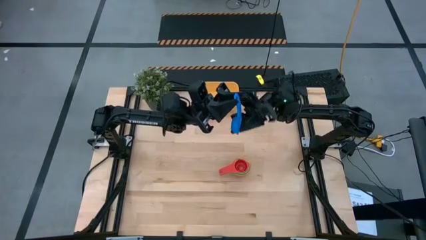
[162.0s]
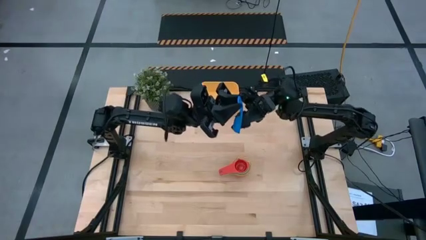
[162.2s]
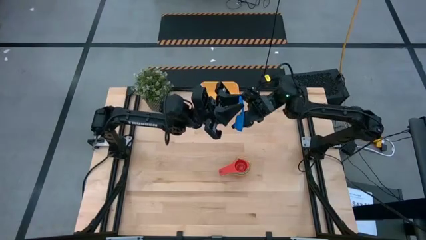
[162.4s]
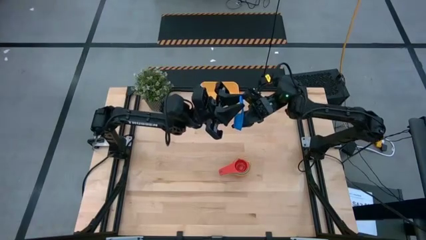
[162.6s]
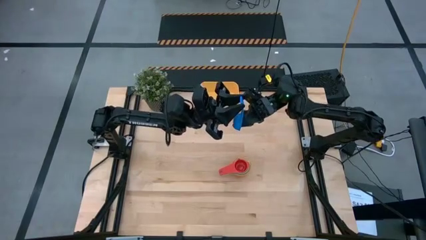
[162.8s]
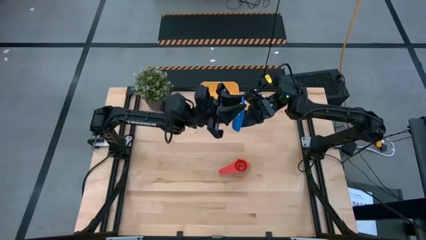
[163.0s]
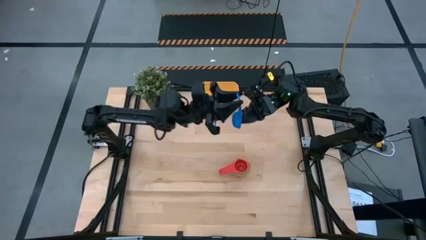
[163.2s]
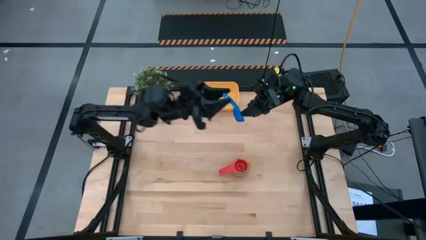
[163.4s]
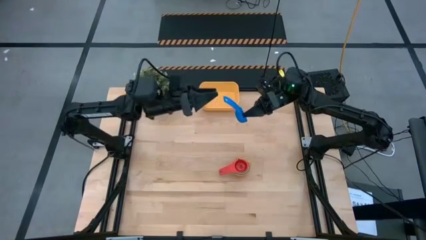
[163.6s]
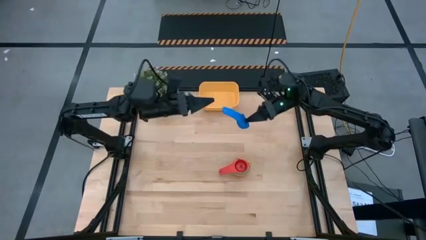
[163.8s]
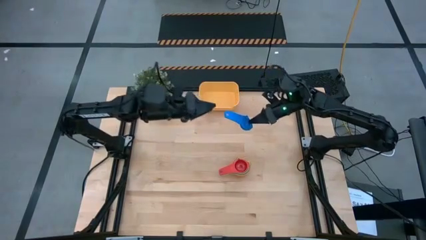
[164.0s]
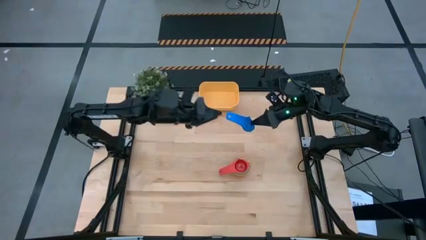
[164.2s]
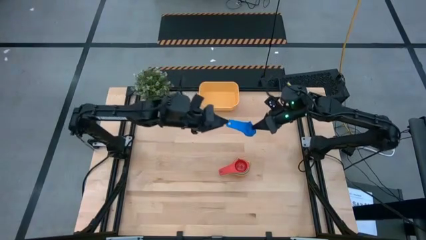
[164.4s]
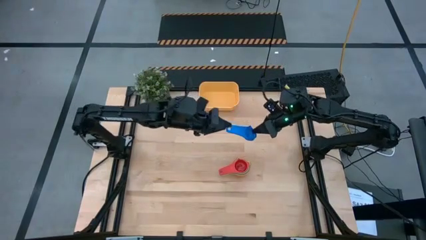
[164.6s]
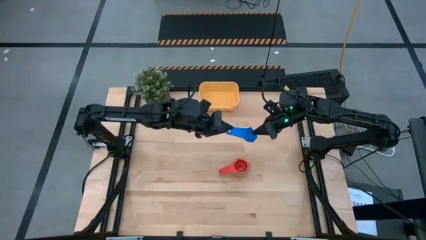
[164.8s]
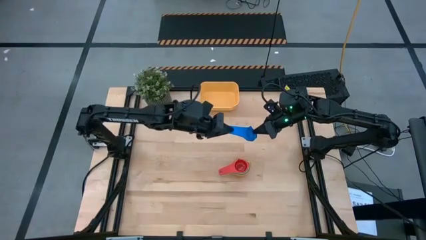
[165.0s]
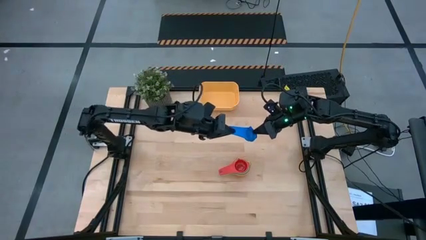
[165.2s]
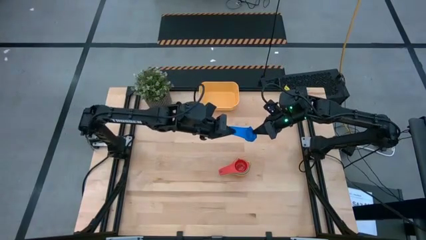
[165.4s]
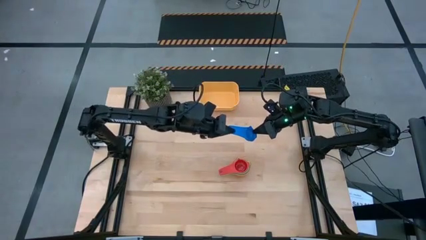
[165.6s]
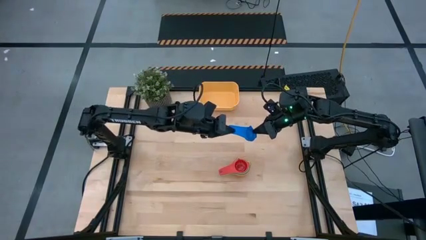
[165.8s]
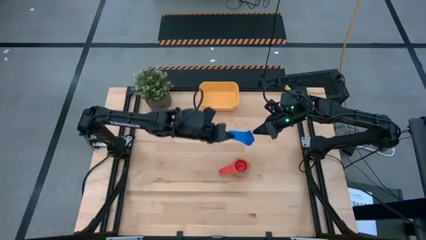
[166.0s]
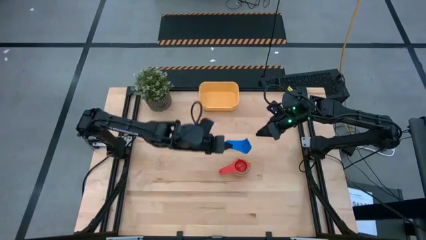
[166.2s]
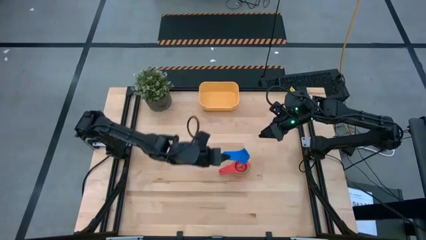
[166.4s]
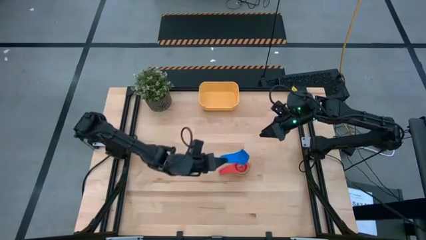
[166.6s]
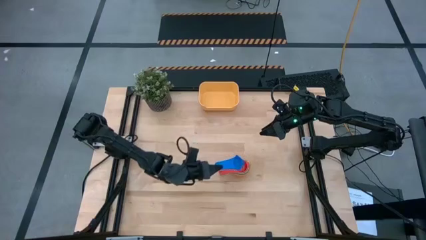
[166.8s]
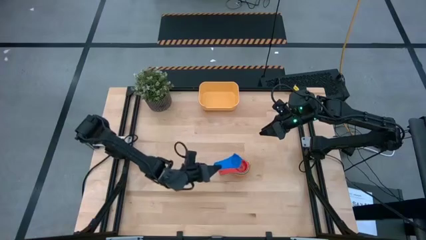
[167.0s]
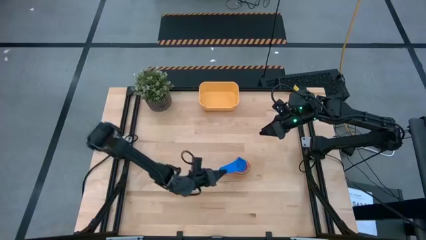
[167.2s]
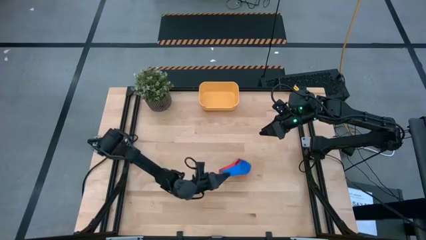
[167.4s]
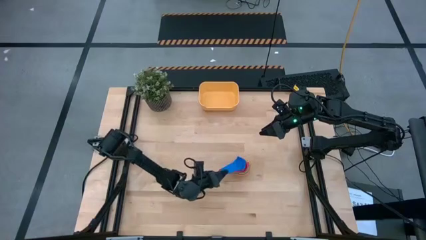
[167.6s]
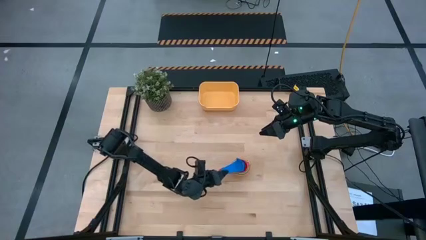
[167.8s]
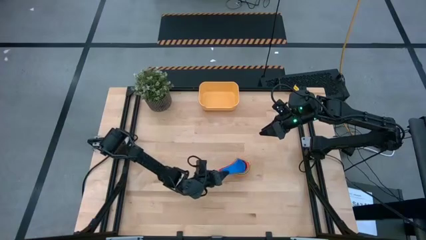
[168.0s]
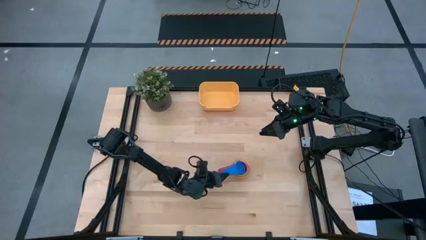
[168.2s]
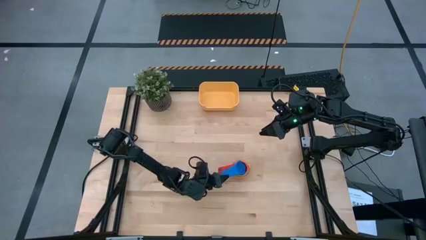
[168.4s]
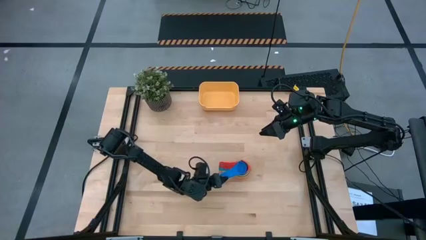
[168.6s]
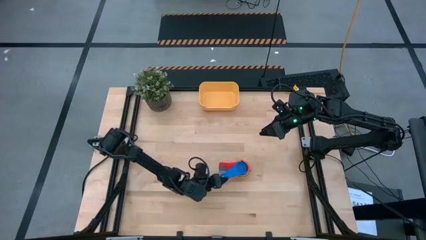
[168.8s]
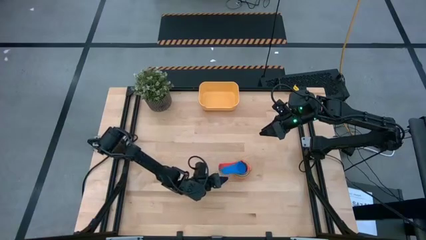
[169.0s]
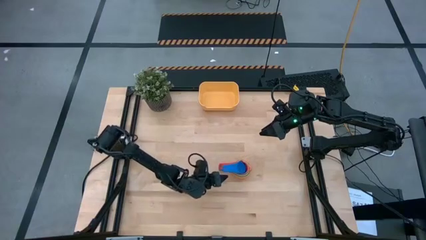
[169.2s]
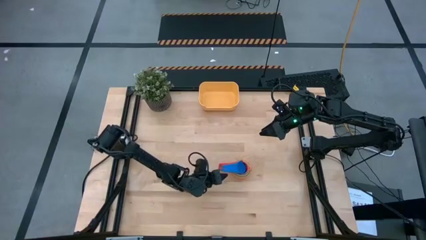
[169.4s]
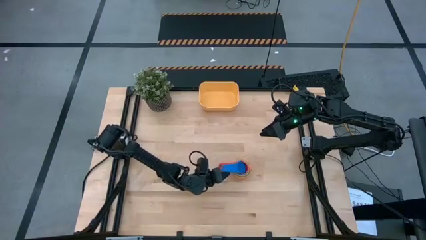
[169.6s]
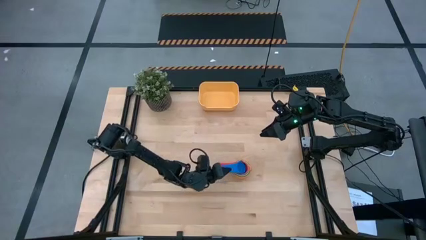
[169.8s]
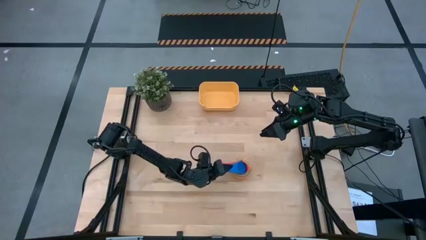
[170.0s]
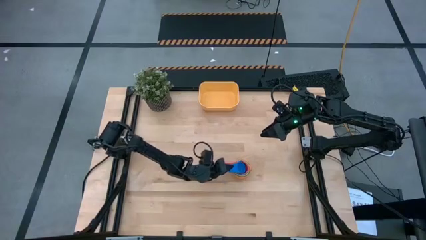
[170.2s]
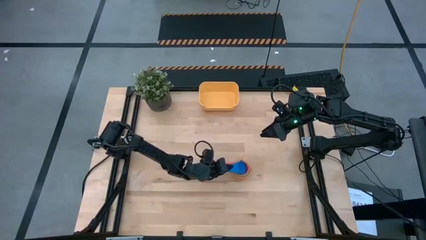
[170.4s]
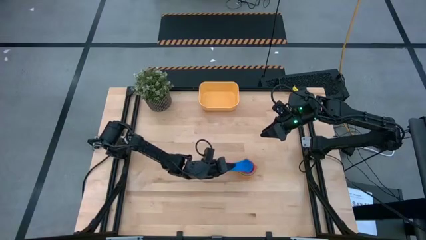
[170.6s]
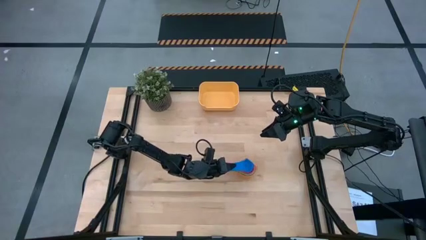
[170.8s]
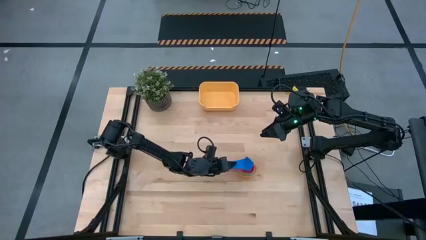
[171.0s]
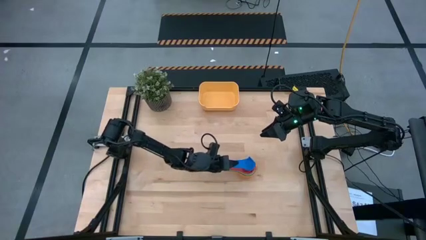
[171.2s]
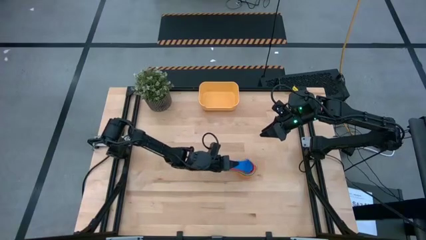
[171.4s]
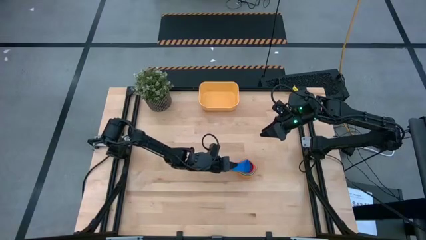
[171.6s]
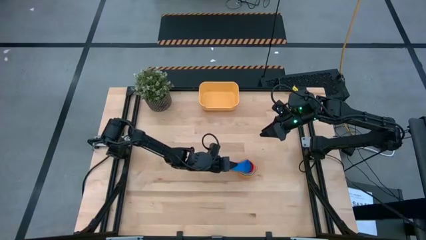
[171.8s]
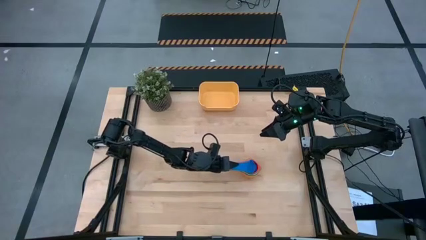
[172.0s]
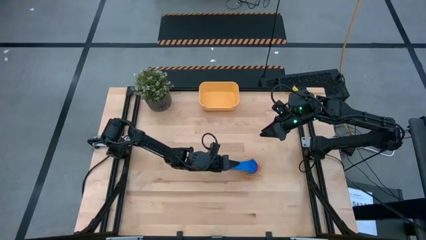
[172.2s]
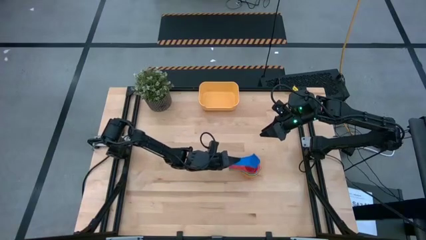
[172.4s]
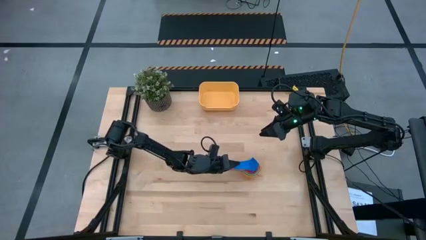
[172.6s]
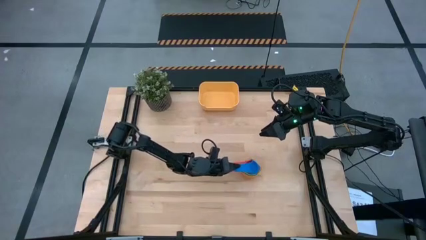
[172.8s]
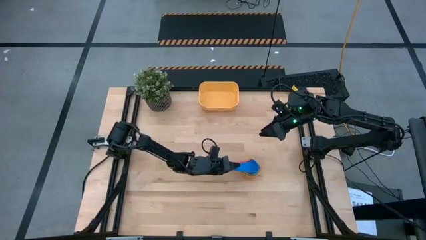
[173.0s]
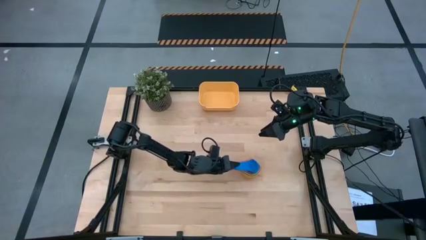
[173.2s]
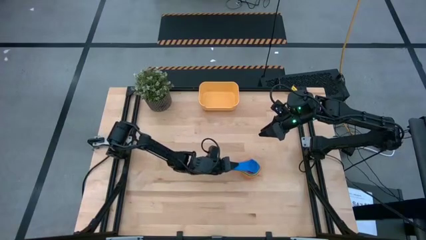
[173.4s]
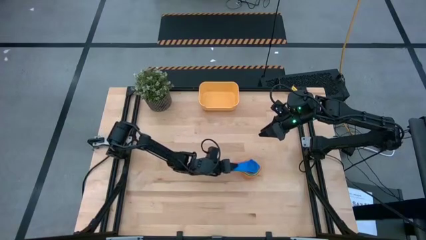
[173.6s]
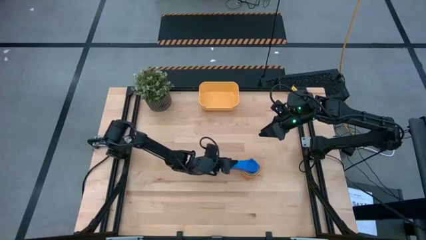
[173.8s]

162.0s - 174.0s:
Task: Nest measuring cups in basket
Stack the blue measuring cup on top of the red measuring cup

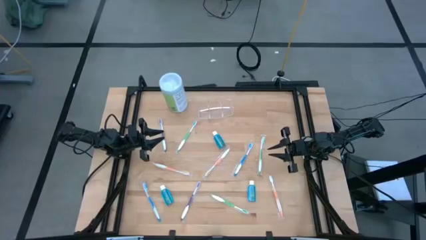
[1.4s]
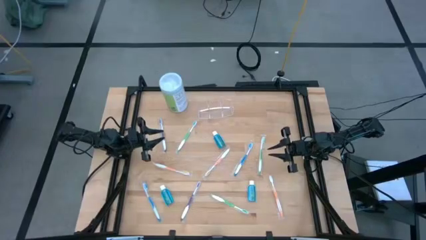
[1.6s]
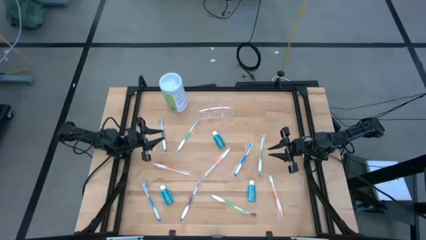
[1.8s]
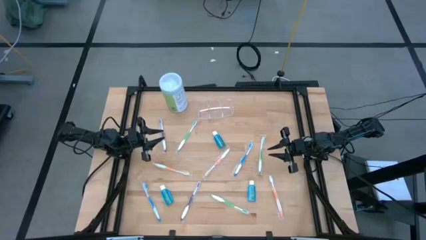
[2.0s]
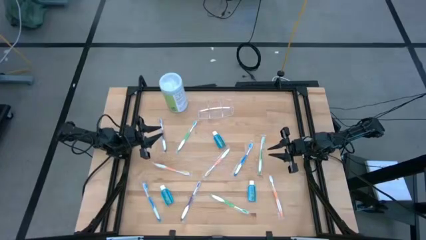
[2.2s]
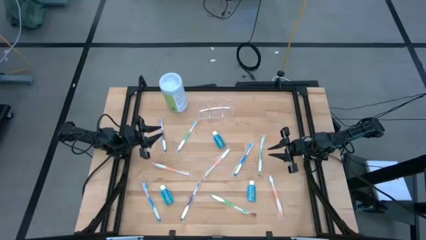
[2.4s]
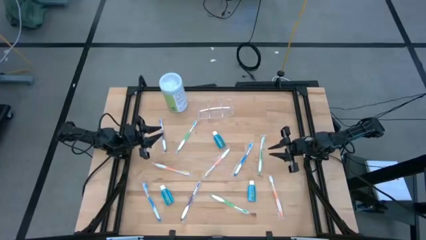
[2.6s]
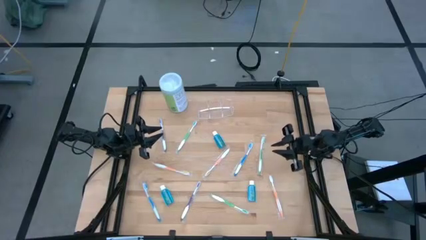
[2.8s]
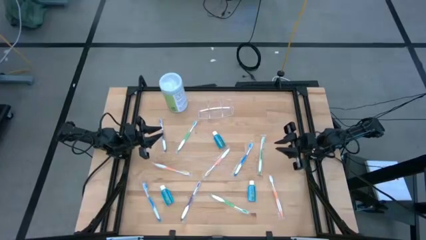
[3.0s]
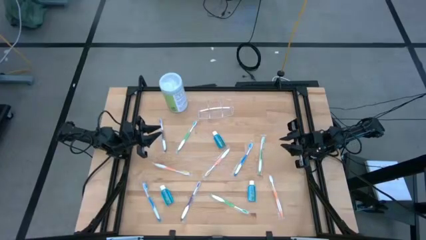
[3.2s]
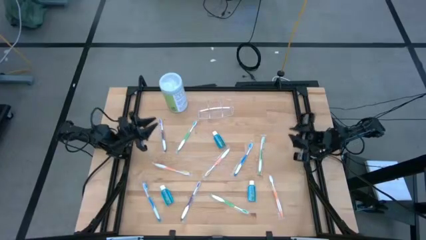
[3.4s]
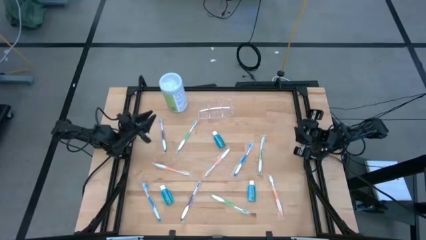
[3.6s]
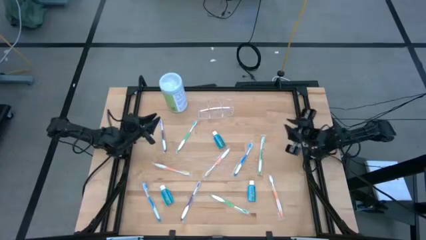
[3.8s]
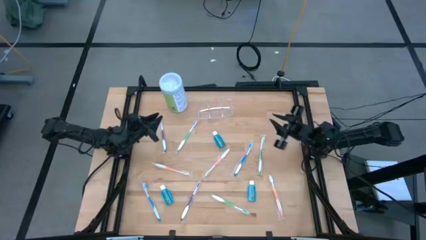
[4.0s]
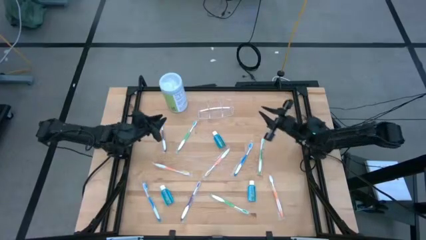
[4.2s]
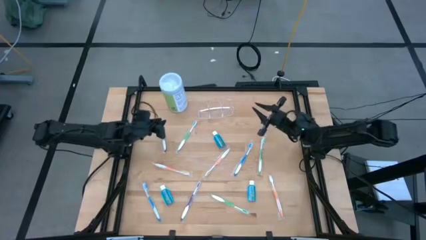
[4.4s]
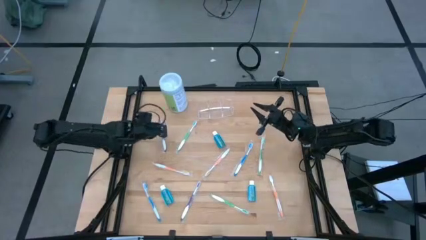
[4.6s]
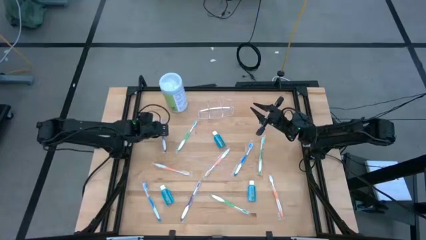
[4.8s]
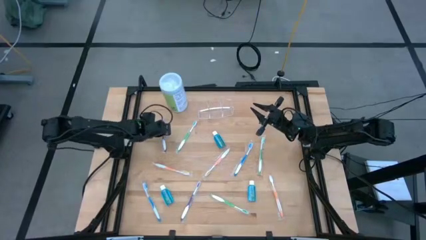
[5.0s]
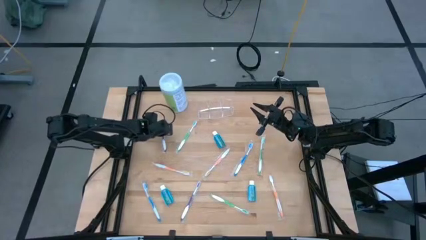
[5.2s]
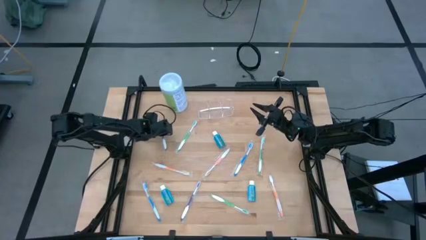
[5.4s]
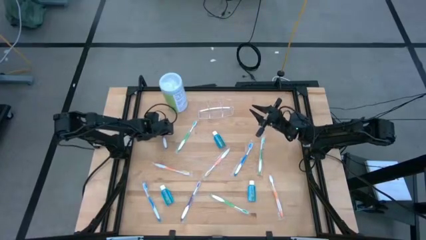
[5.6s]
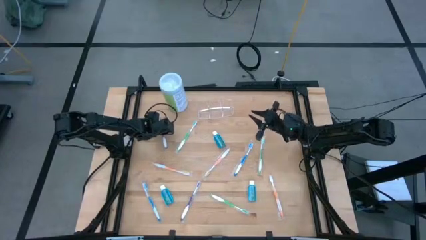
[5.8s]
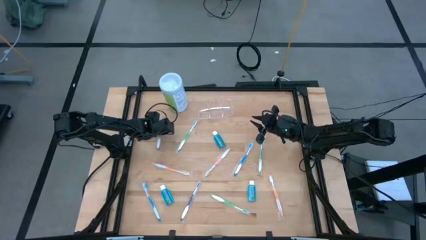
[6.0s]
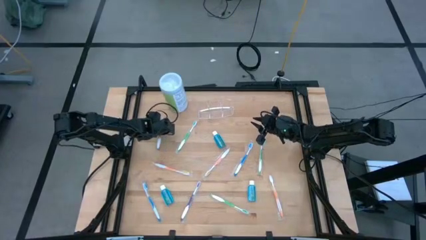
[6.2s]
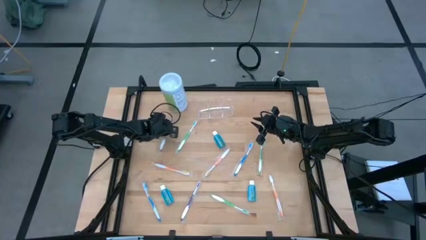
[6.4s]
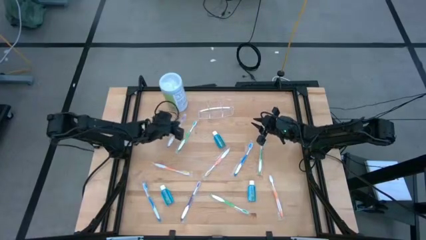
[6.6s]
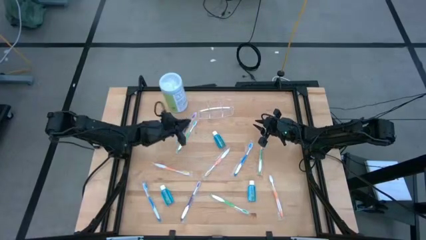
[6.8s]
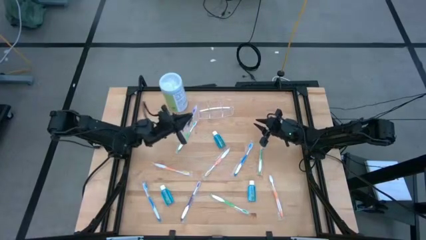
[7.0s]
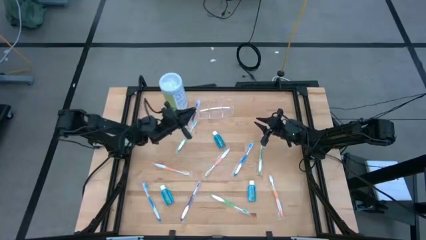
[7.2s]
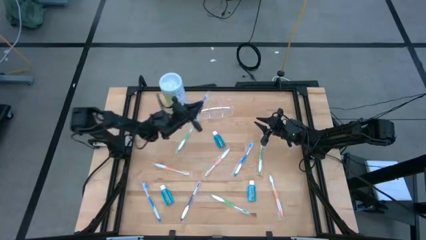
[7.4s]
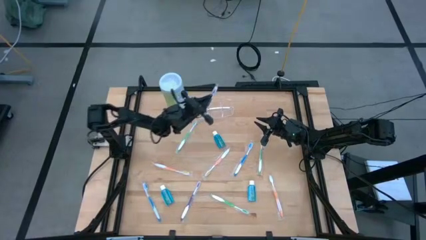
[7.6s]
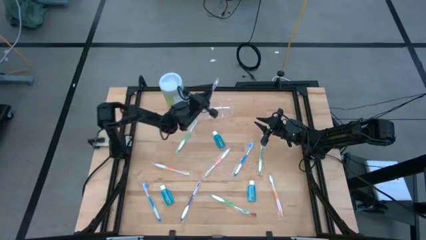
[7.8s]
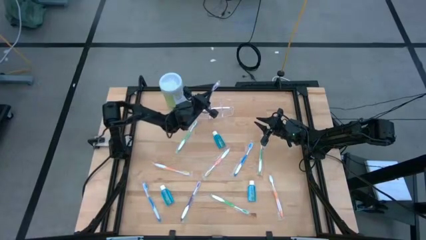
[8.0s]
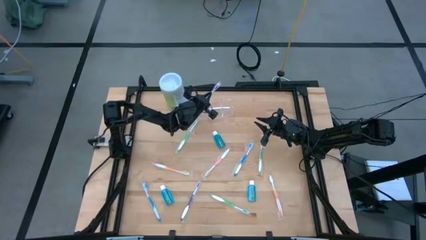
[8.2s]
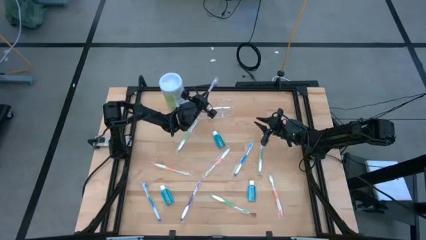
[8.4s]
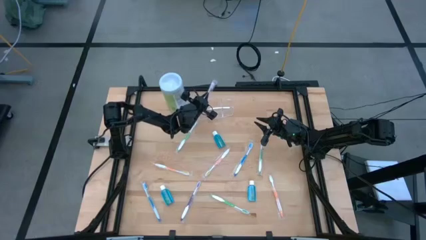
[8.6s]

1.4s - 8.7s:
Task: Pick & Place toothbrushing station
Put the top purple toothbrush into the transparent organizer
